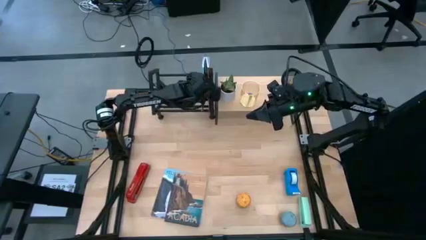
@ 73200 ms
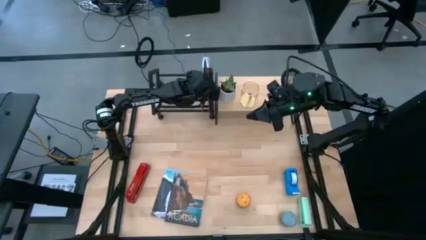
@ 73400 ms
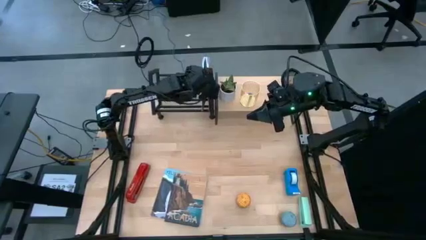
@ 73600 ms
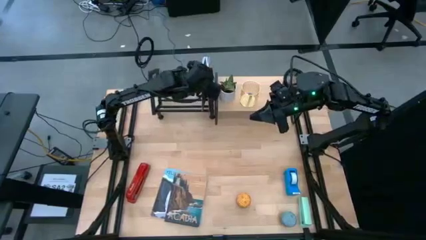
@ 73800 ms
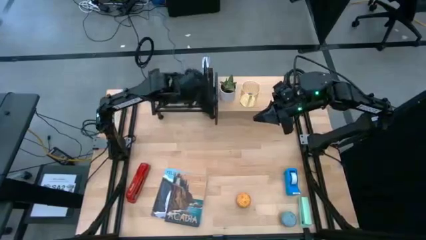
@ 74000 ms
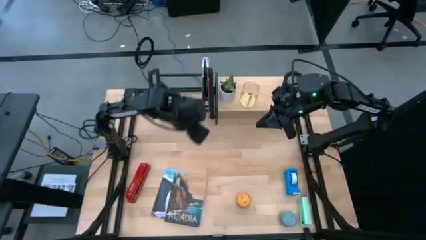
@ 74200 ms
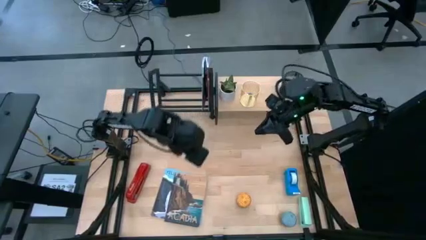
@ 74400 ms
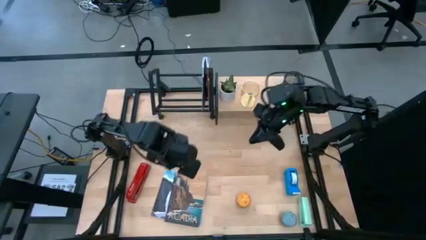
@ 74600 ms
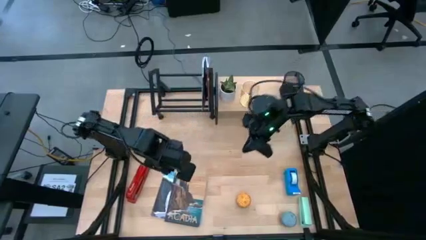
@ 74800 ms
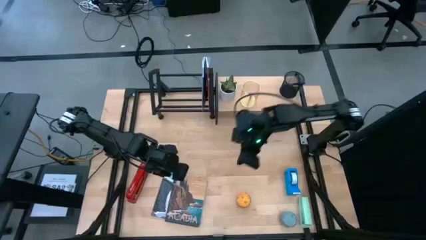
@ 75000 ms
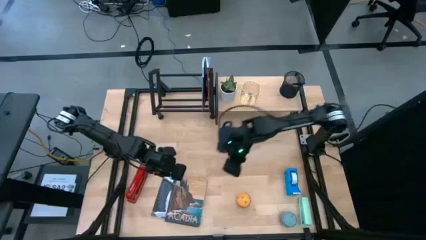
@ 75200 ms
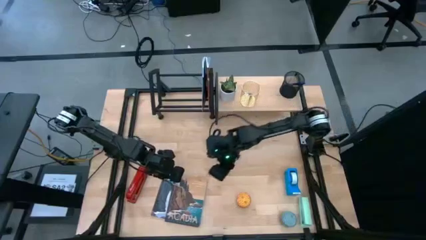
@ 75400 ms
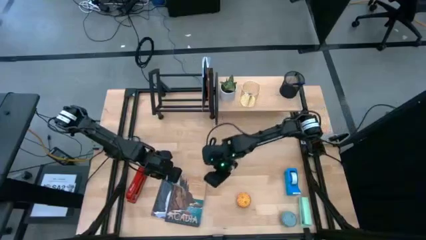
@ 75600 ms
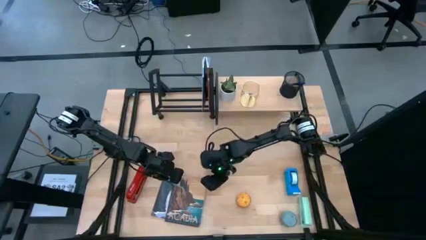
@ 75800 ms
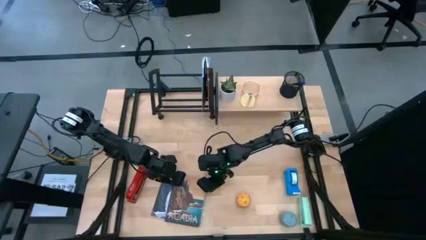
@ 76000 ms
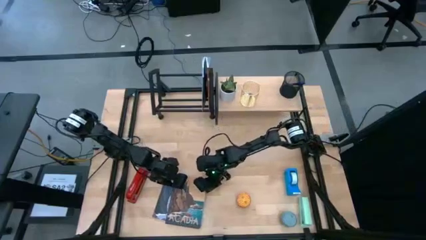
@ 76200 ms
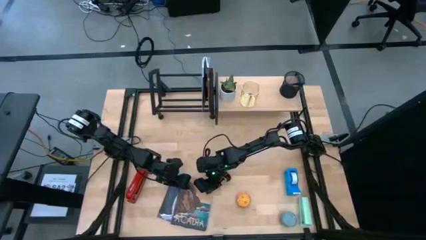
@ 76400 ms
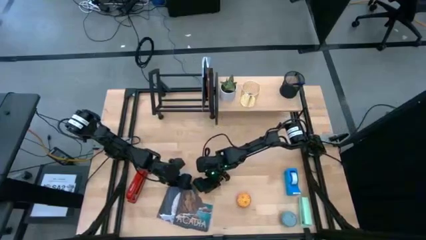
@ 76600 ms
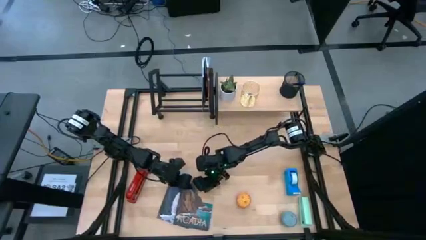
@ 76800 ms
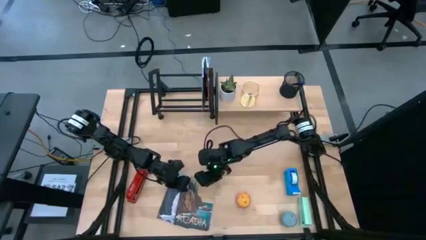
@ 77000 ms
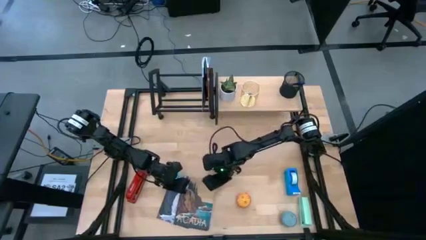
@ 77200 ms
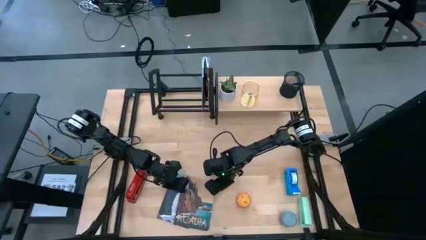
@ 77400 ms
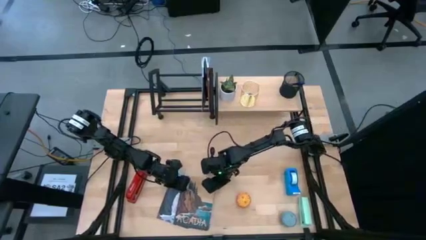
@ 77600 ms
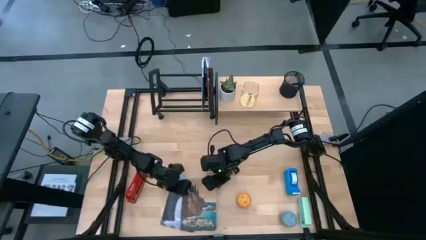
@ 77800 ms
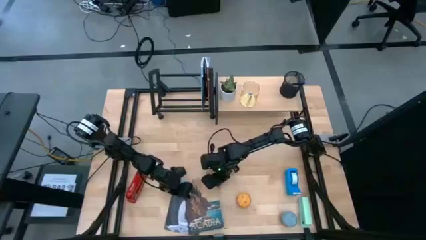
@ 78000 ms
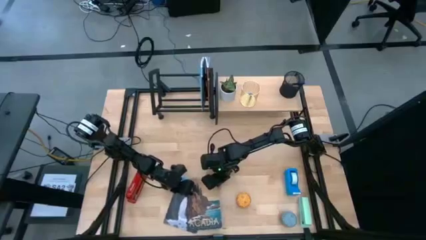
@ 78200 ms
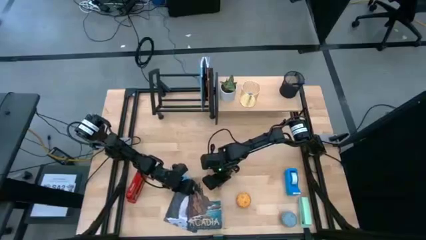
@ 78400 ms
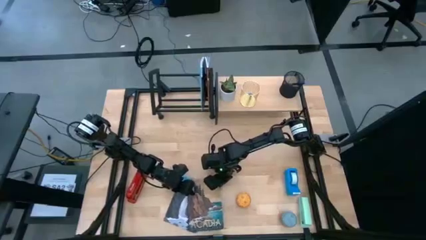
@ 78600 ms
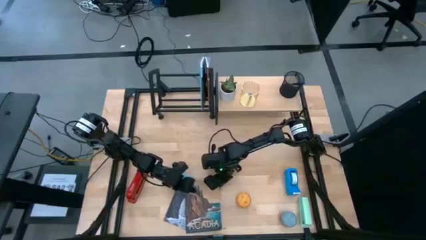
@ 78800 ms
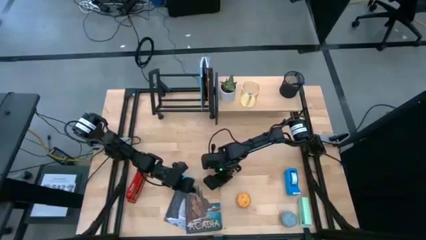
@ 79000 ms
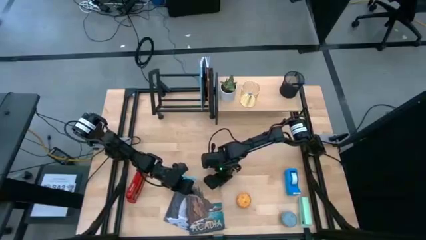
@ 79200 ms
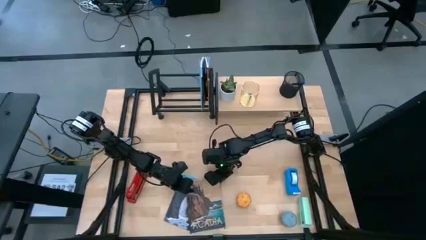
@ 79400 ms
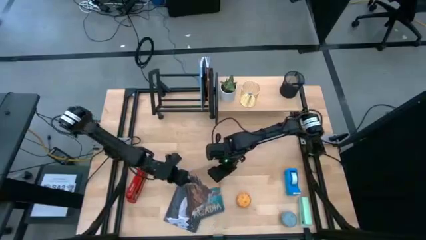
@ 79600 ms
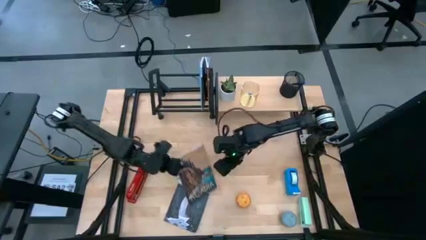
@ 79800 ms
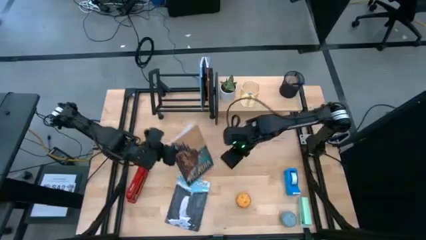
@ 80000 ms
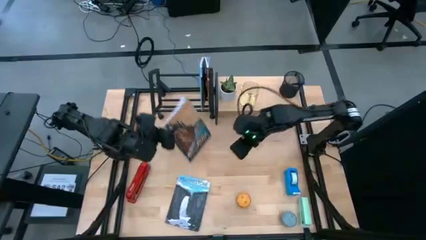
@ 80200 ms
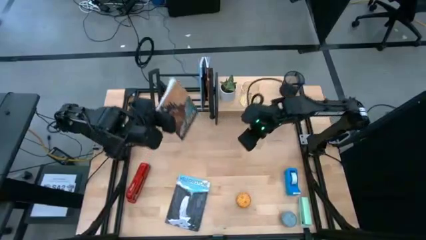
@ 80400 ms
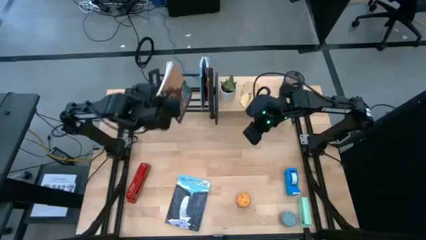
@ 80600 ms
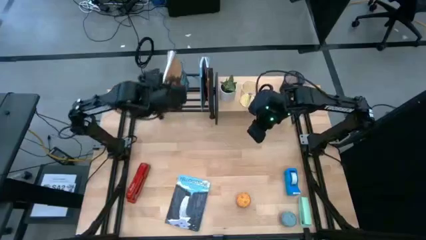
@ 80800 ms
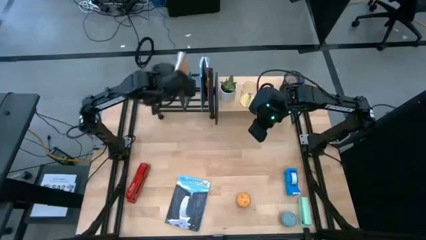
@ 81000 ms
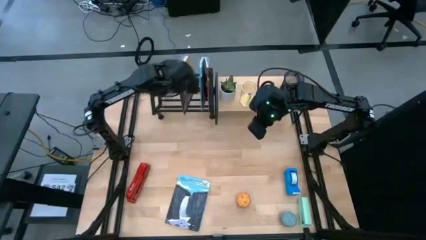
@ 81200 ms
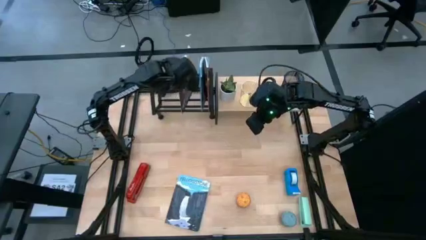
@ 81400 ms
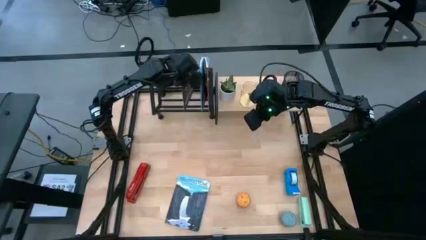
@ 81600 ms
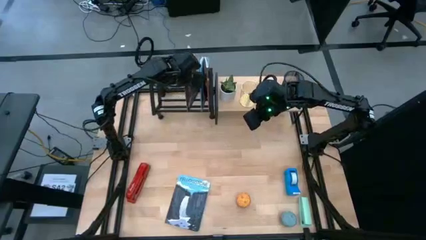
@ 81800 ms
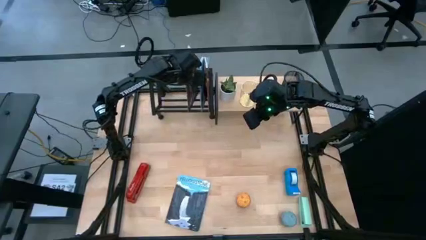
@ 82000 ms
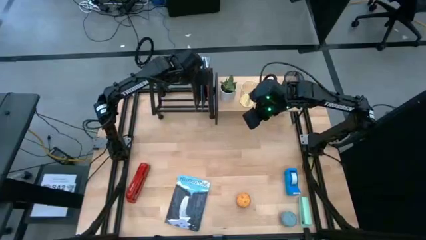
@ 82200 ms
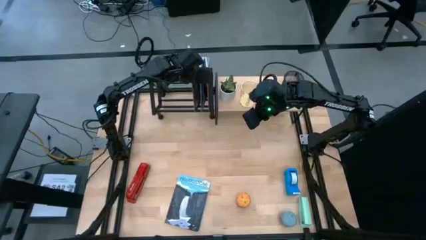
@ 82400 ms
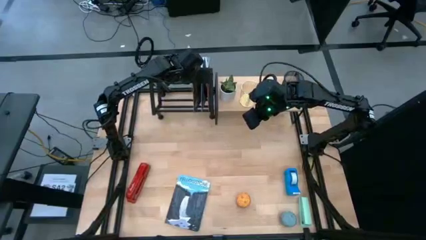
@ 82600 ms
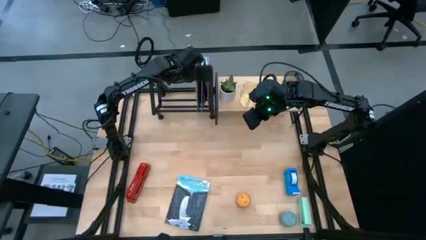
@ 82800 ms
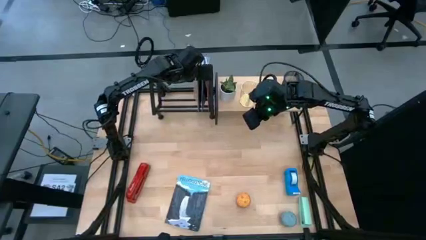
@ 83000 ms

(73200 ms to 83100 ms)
Task: Stock shelves
Put the brown book on the black book shelf

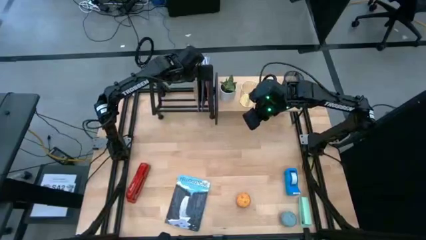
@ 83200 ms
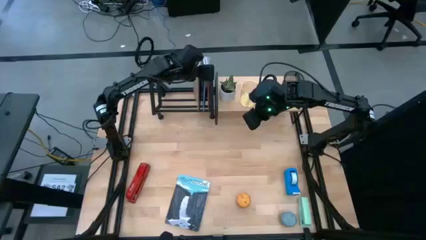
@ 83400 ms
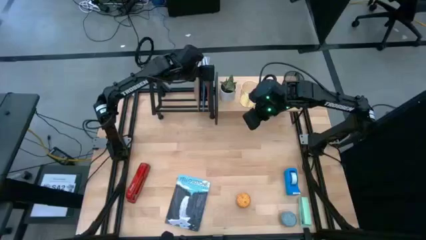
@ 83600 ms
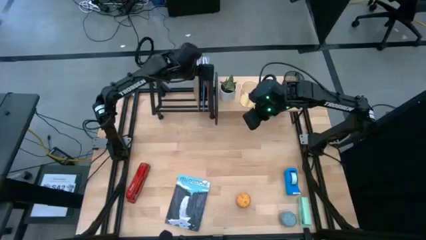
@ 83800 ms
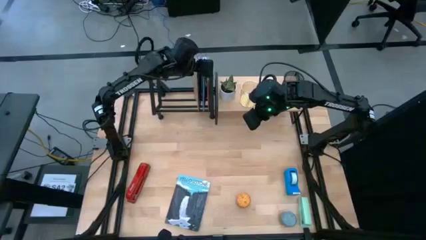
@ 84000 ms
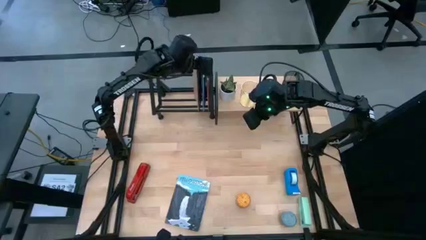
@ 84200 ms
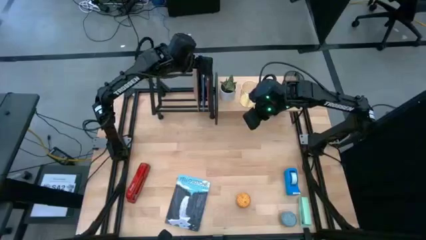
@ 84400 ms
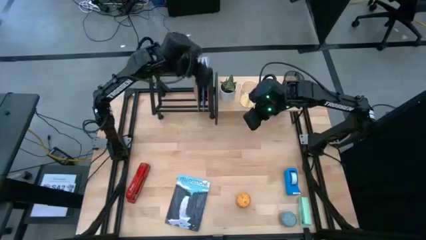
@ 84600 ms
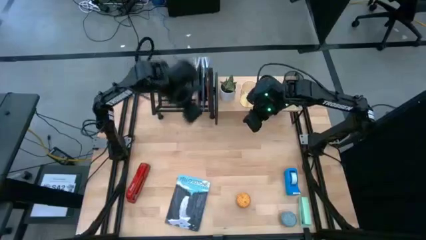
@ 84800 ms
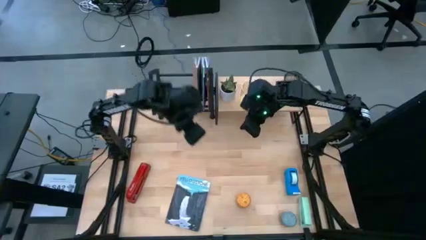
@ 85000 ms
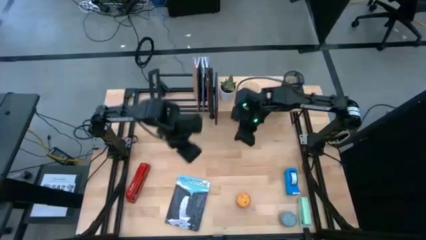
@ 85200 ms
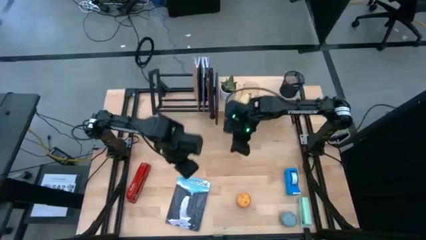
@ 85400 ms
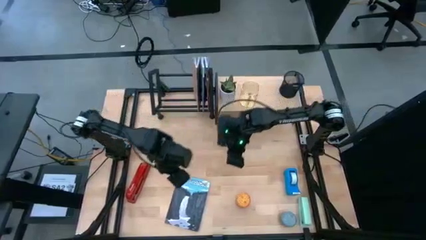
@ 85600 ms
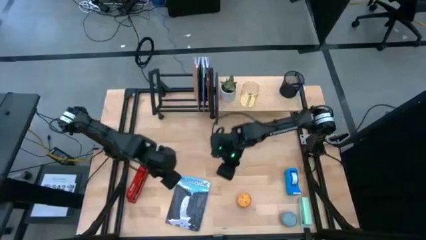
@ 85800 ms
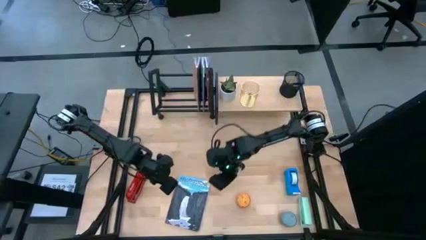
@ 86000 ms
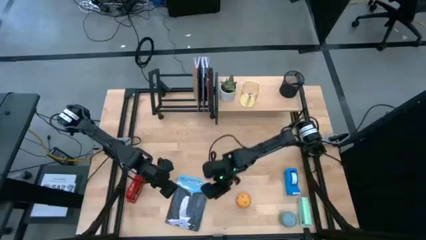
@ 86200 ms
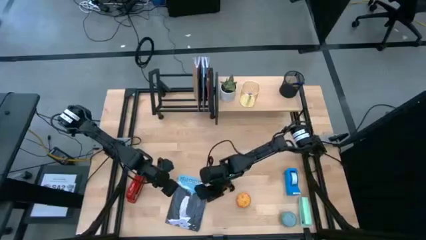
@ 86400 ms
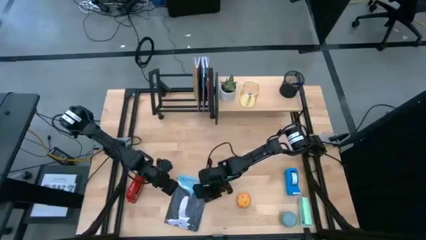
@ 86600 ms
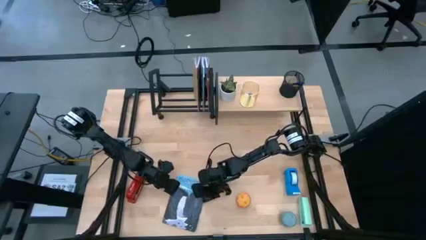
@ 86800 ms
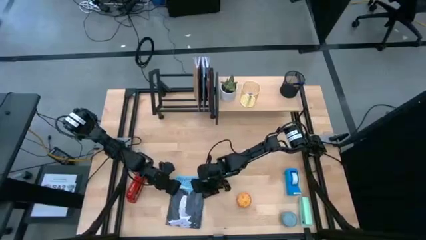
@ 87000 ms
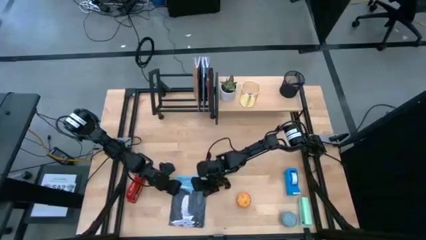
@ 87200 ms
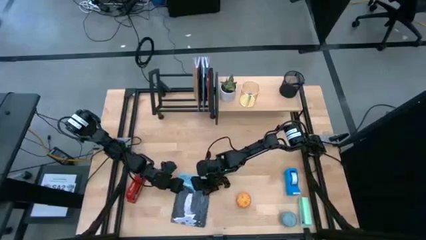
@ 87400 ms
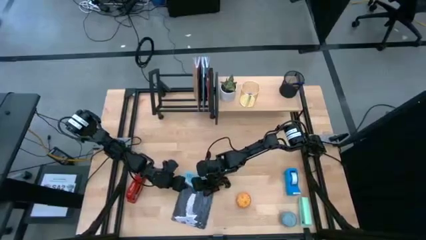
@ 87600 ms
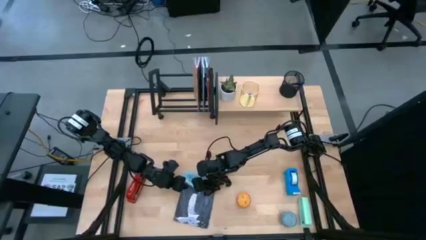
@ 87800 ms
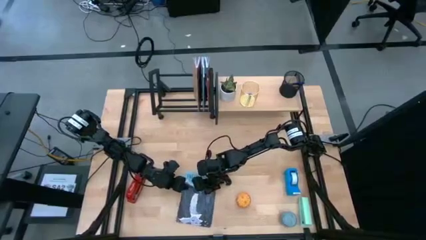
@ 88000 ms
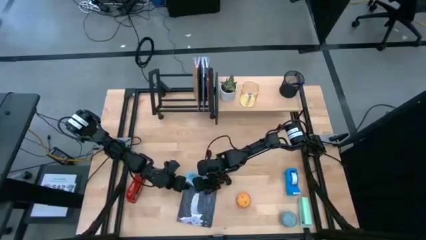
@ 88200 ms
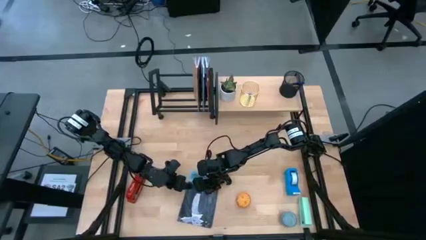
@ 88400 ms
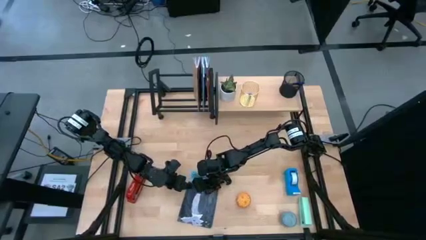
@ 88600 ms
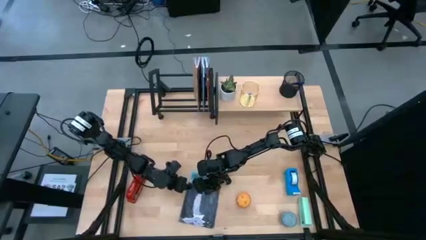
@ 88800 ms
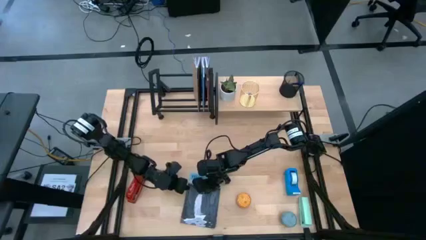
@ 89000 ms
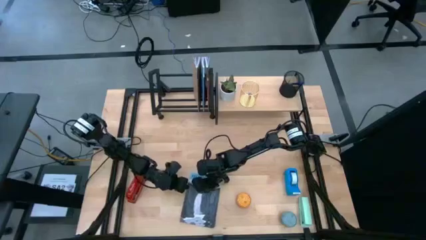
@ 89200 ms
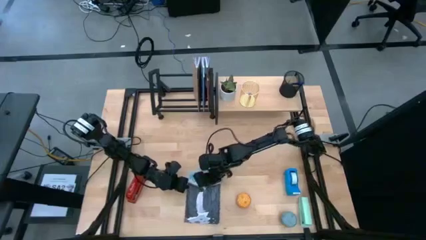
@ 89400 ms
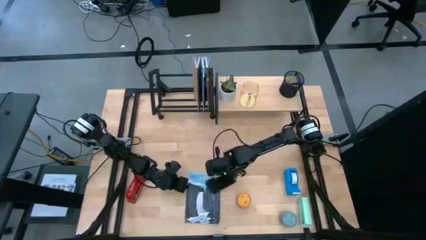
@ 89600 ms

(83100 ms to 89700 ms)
Put the blue book on the black book shelf
